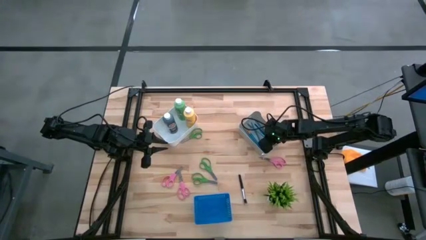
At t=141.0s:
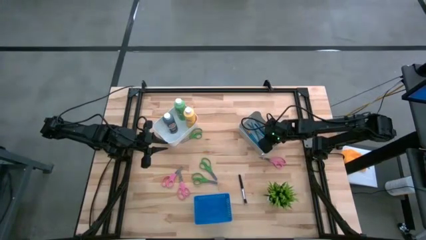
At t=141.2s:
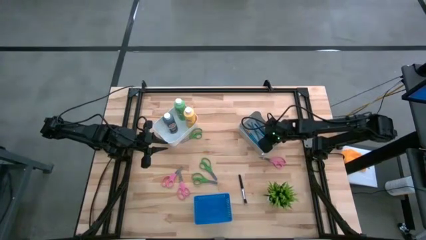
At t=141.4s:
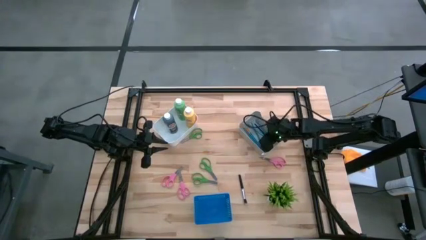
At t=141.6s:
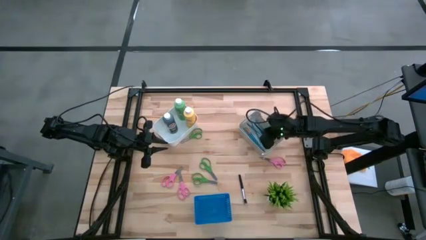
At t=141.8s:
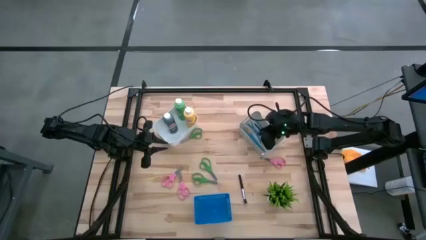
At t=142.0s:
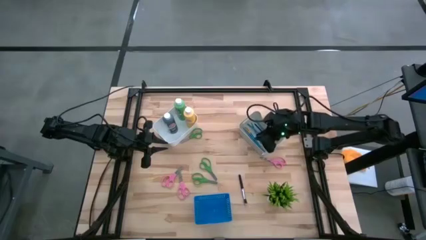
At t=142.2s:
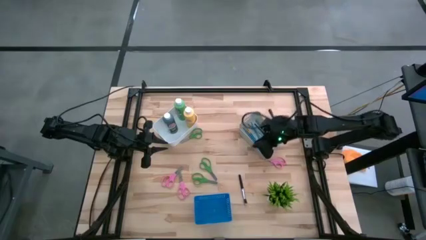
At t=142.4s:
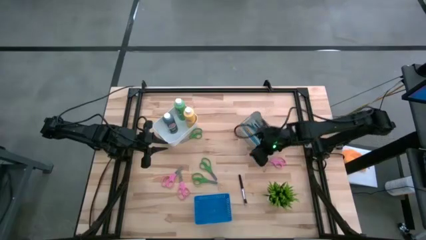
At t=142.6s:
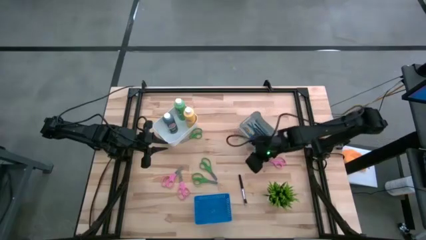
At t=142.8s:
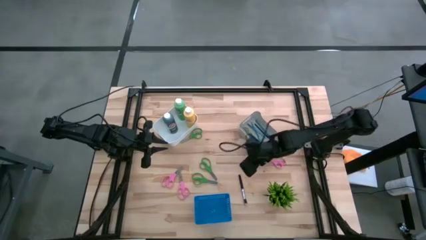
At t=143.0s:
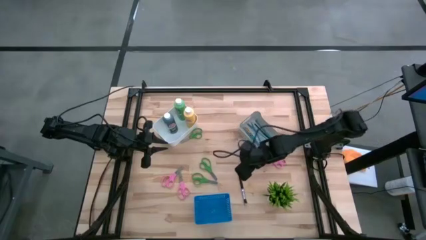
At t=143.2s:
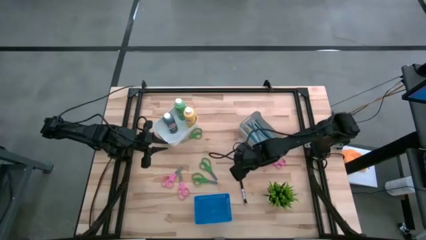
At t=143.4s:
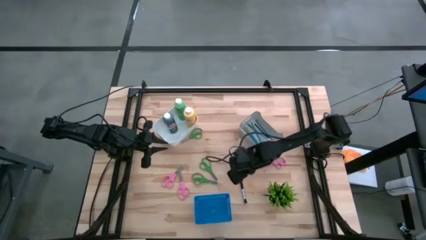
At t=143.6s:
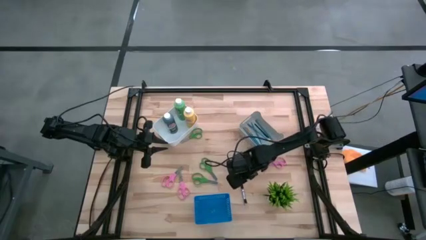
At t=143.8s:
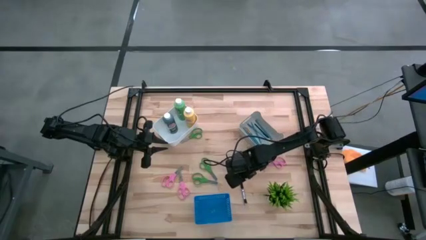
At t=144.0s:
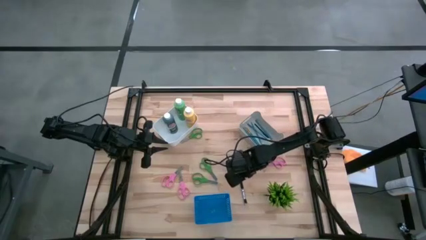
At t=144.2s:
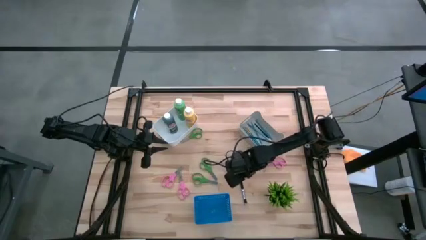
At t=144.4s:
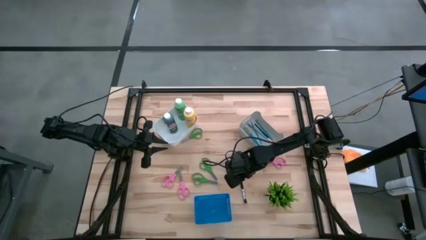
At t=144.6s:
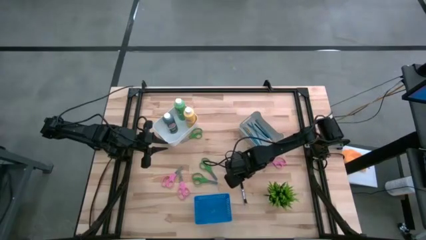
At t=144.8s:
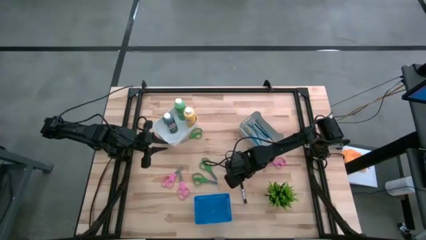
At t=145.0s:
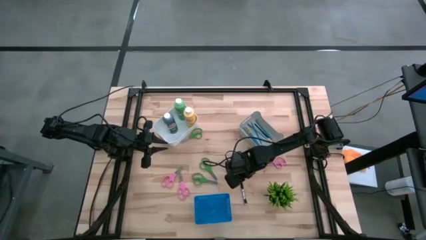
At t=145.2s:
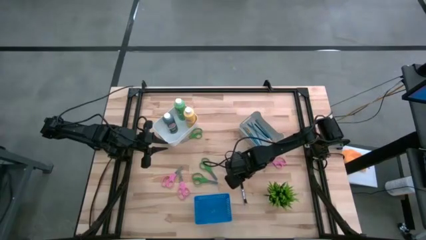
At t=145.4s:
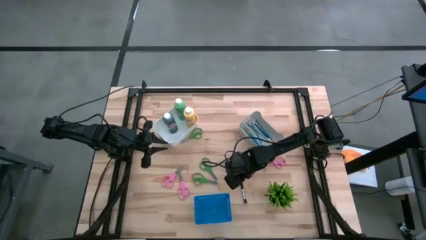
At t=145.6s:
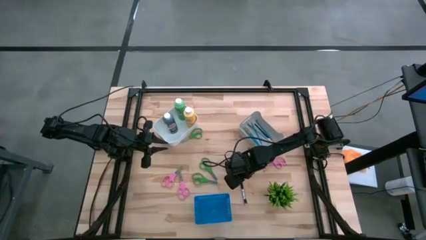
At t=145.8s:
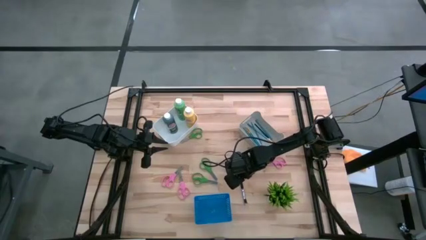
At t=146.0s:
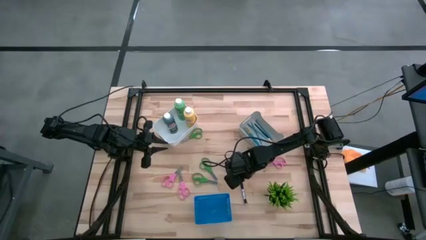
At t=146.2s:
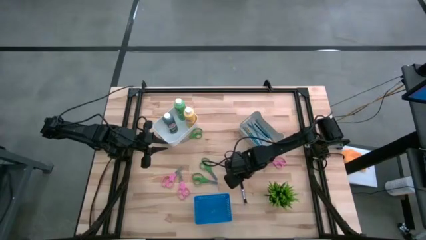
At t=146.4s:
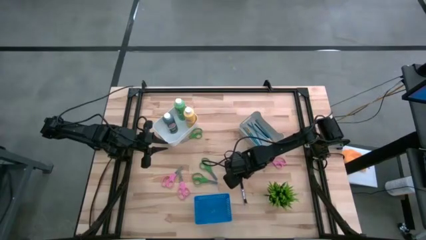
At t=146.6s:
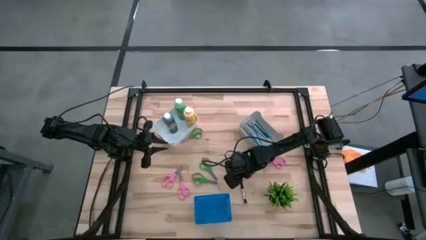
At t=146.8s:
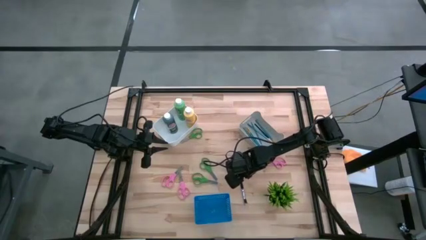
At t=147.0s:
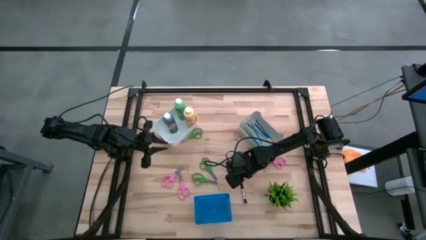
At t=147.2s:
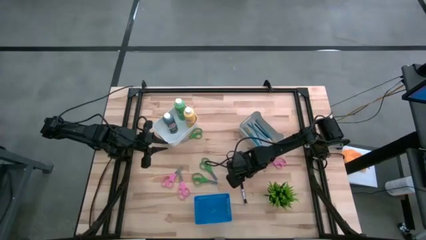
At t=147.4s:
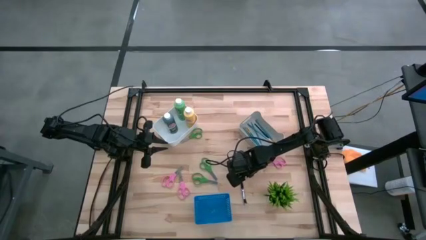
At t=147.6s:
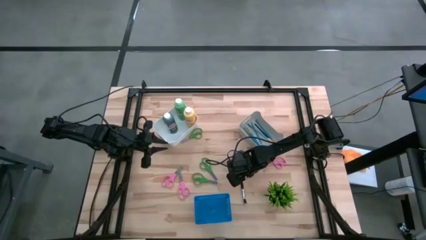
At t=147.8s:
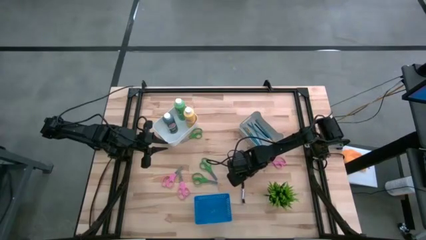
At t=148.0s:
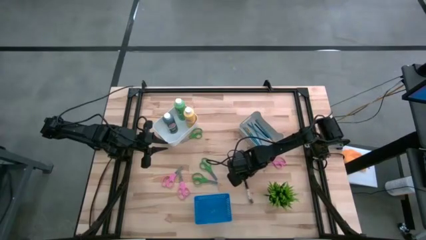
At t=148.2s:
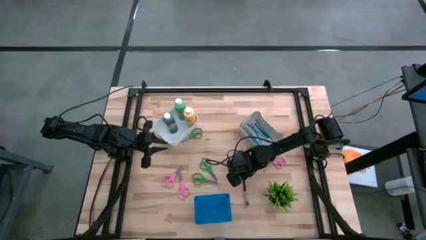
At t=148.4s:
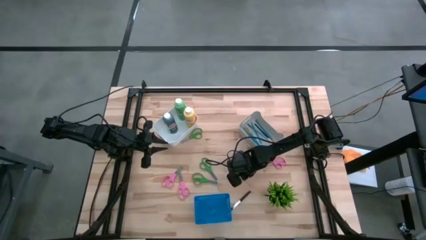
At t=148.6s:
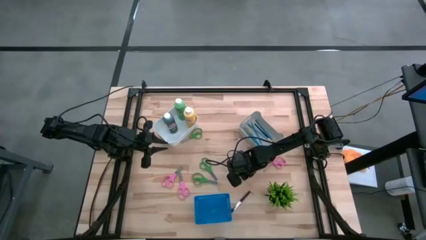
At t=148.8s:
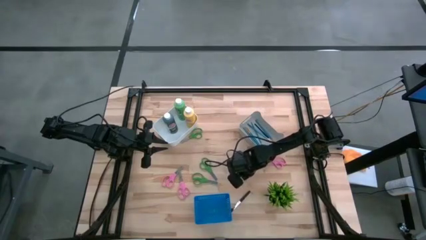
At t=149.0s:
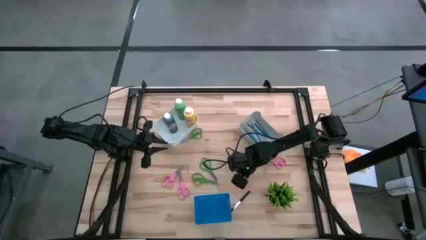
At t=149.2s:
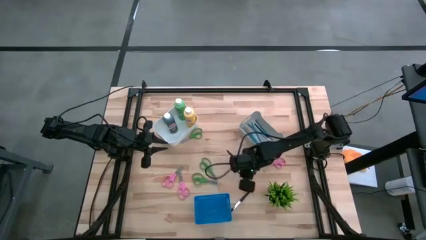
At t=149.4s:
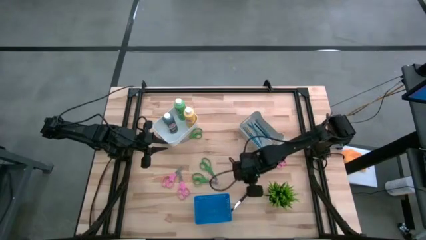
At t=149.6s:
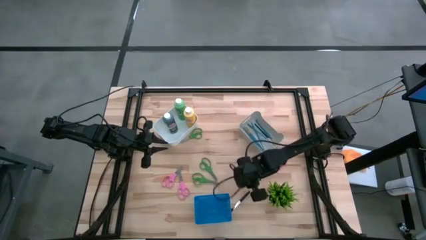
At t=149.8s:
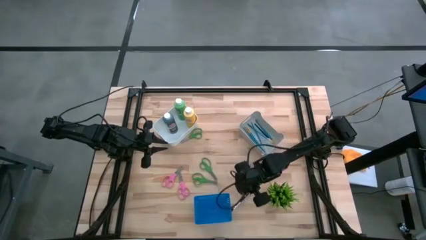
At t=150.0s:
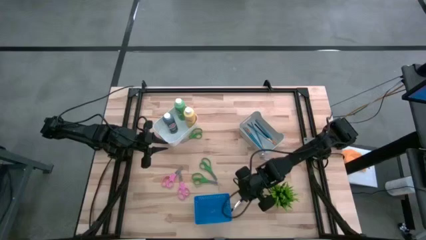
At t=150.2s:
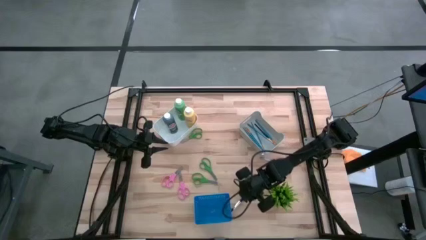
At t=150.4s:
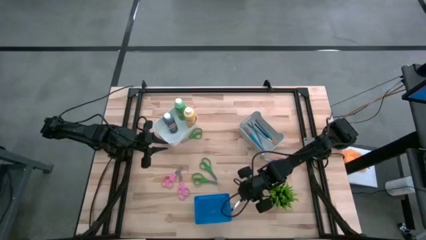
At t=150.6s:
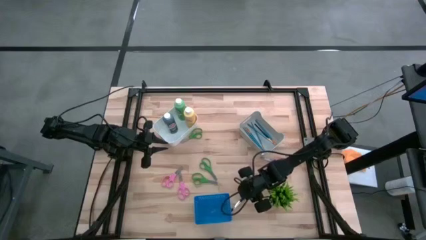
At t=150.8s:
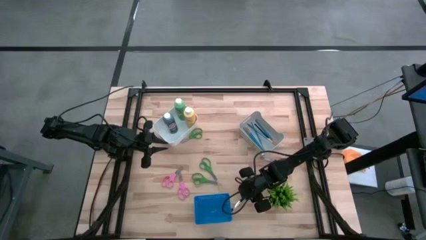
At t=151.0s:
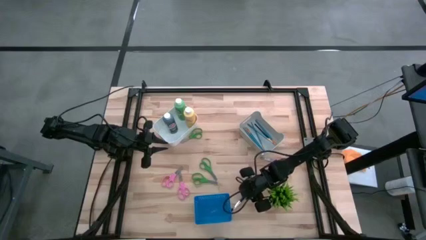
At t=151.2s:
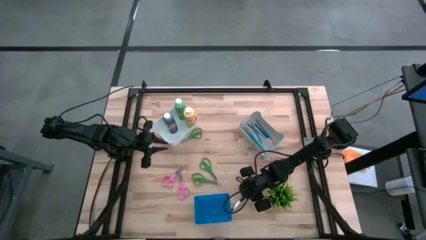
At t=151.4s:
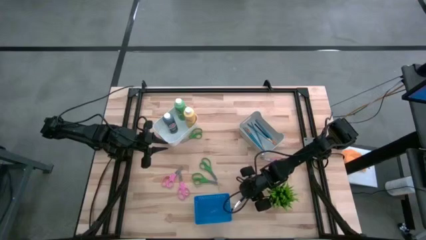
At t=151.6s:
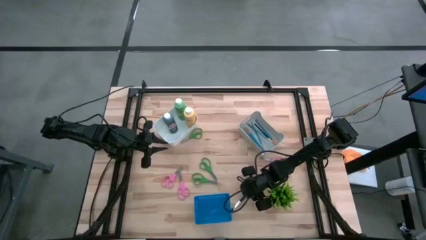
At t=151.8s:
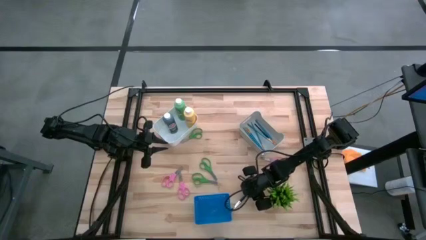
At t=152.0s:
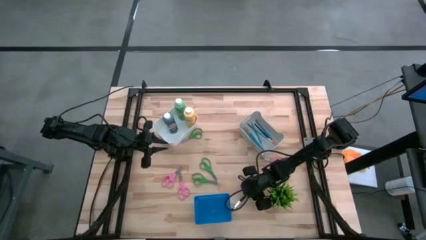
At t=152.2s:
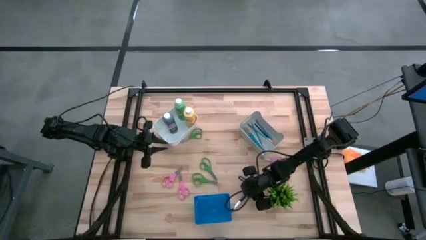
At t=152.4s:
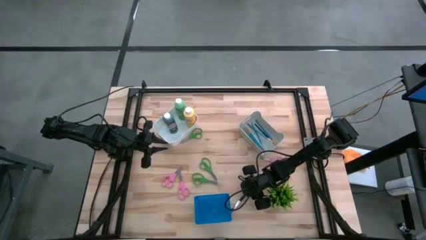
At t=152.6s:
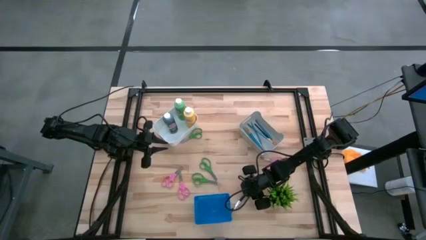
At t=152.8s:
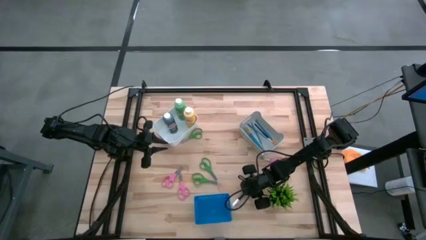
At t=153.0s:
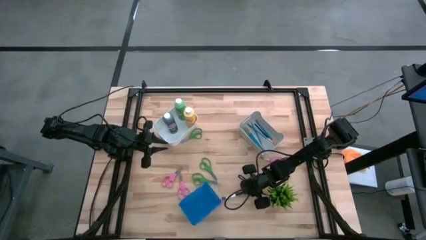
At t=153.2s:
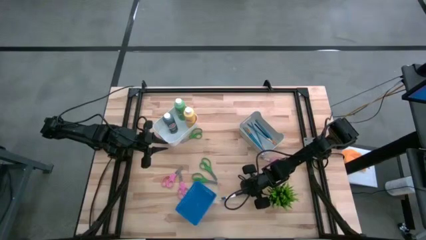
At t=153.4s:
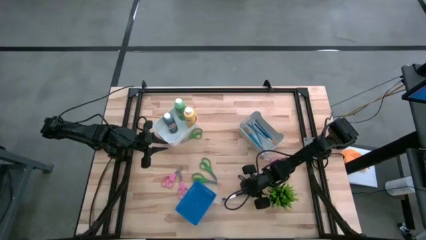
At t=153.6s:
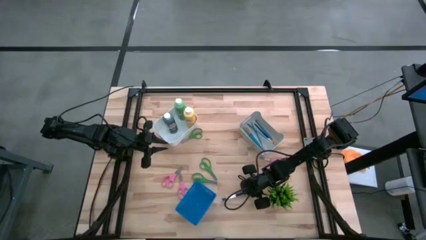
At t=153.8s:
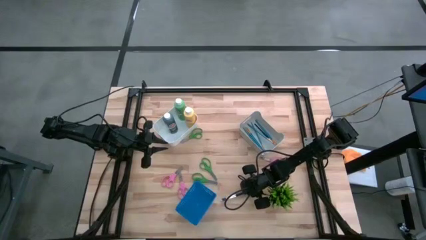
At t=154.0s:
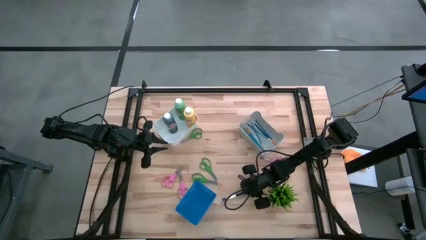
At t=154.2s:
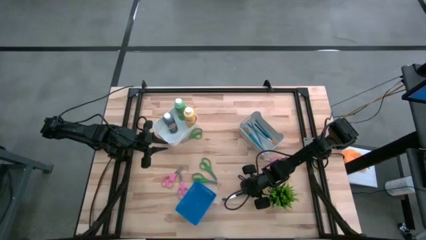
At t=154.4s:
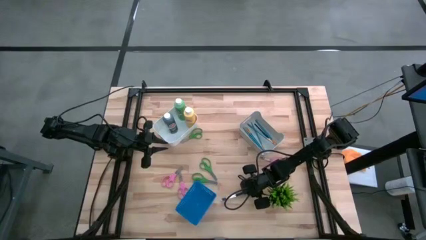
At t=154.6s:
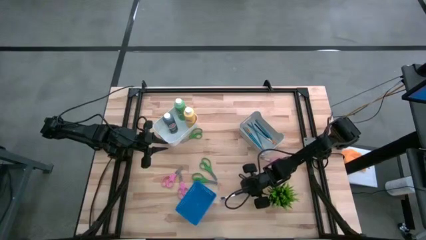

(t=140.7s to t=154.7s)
Task: Pick & Place Paint Supplies
Put the black paintbrush into the gray bin

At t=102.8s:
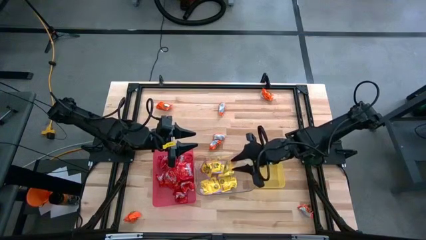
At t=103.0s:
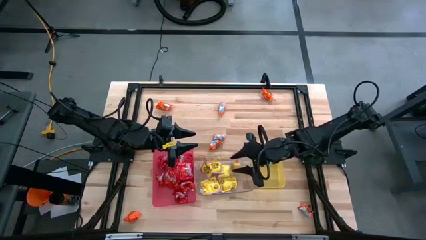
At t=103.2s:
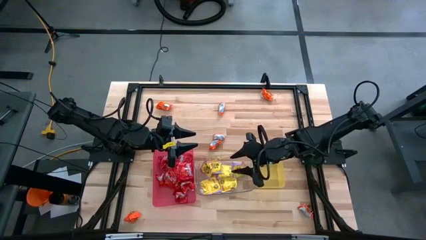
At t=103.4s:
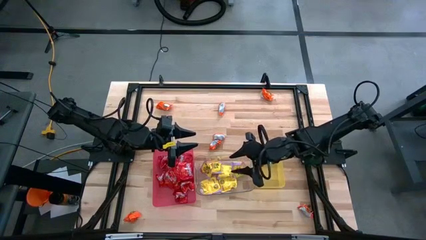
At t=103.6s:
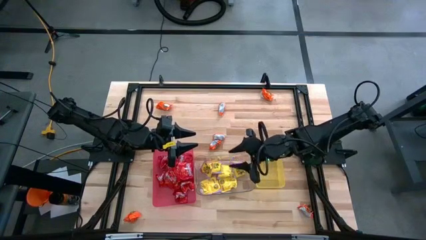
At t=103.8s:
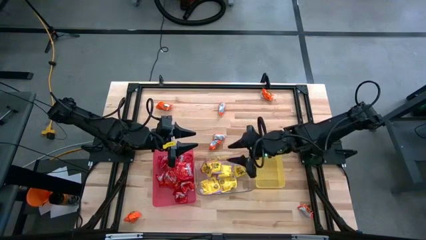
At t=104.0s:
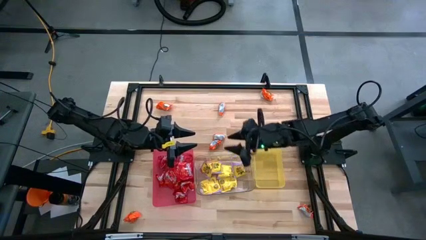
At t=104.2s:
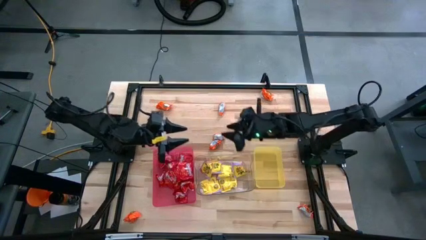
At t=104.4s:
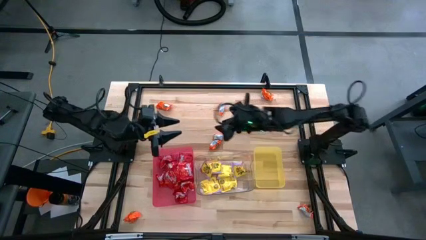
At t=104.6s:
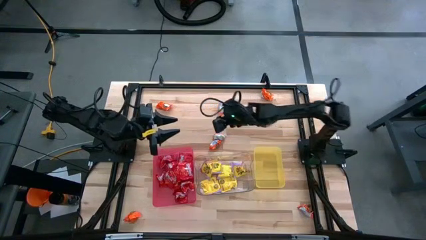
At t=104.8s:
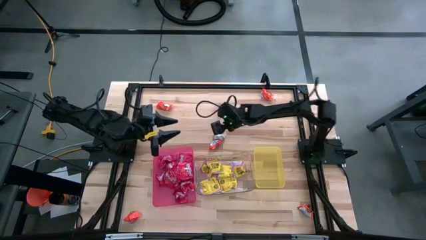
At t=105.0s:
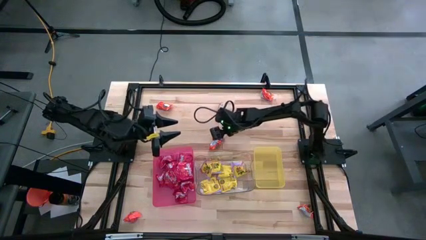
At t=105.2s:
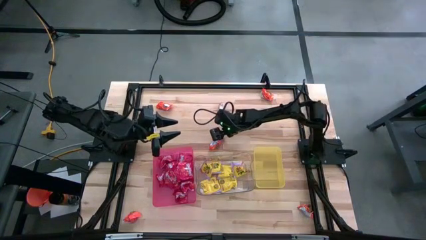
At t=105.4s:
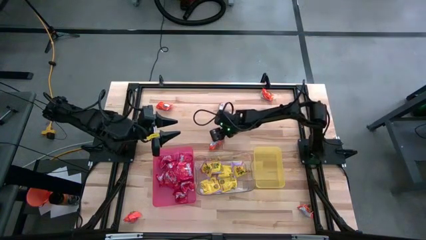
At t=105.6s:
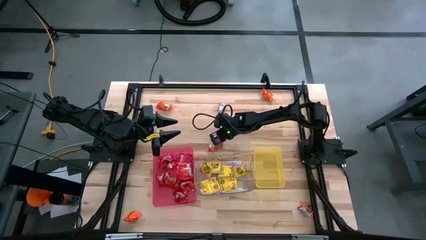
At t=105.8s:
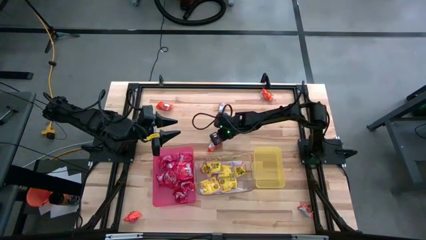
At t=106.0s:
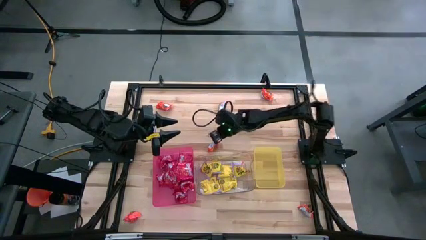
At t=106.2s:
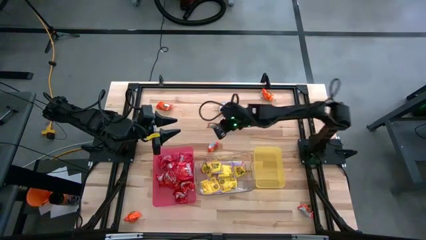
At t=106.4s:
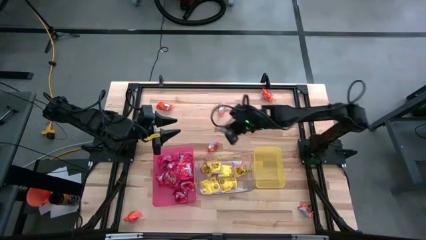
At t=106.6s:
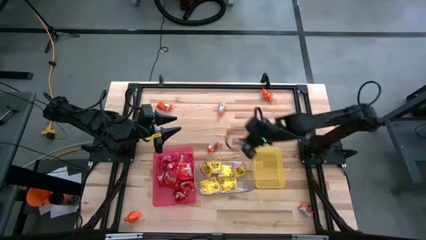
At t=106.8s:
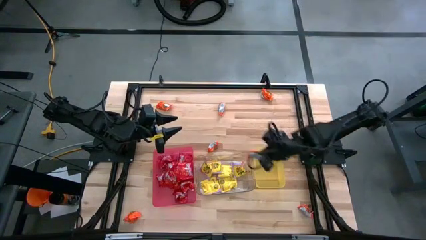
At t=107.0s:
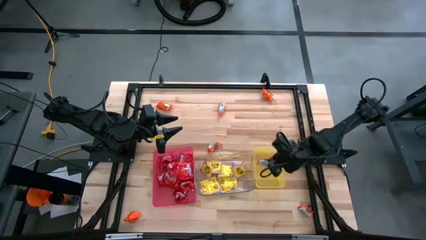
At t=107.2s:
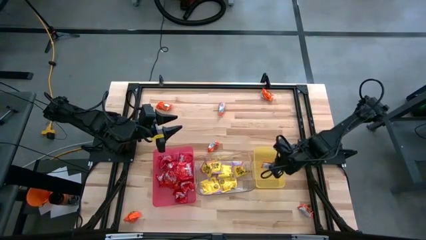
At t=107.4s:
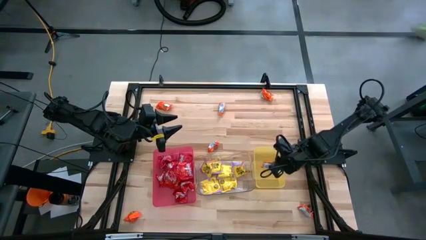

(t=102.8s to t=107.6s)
Task: Sort candy
Put the orange chocolate into the yellow bin
